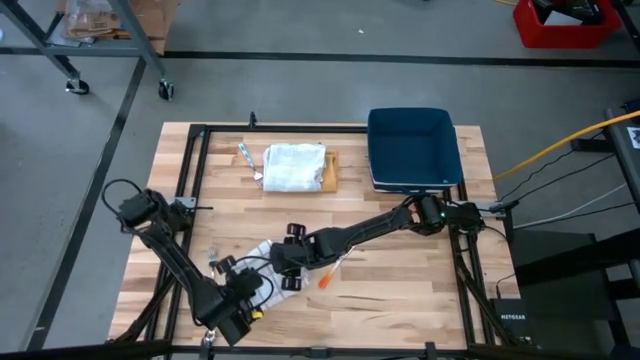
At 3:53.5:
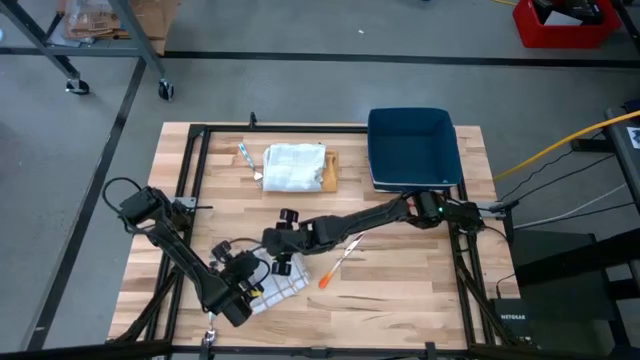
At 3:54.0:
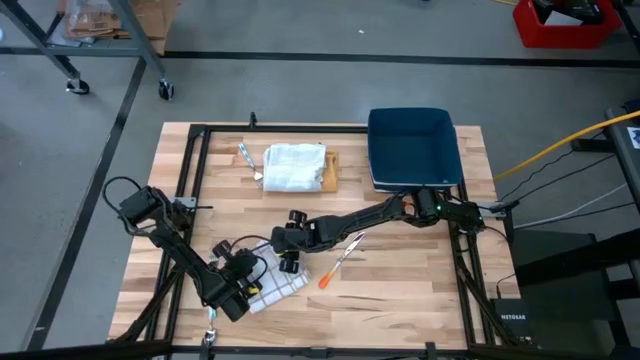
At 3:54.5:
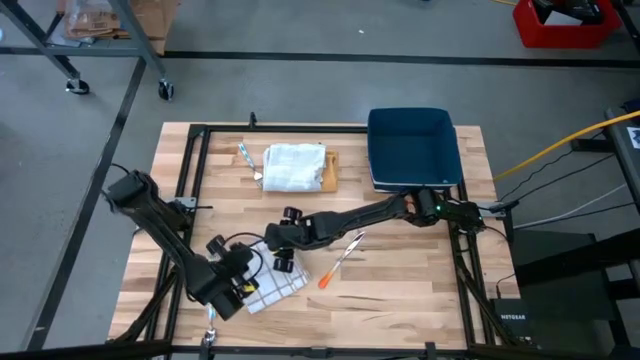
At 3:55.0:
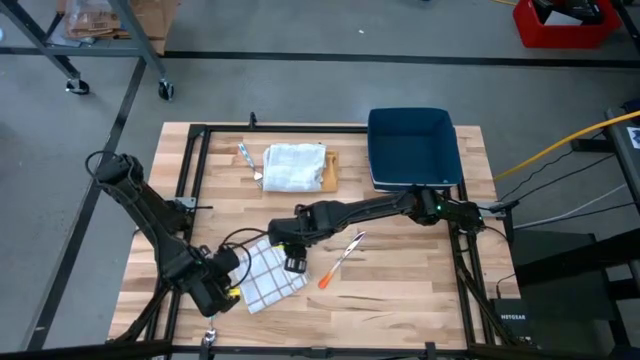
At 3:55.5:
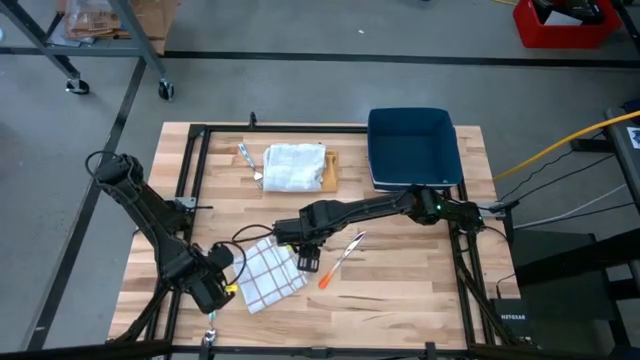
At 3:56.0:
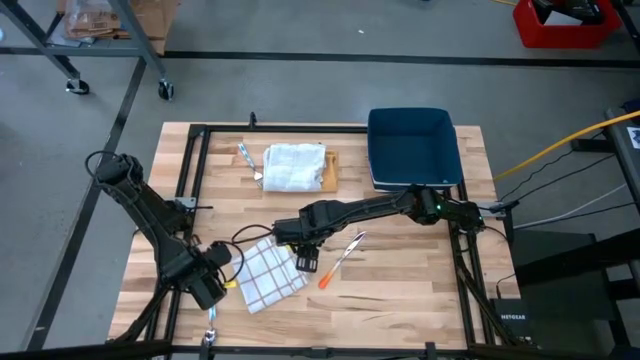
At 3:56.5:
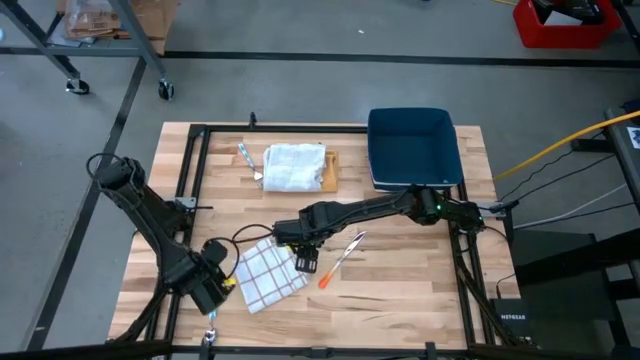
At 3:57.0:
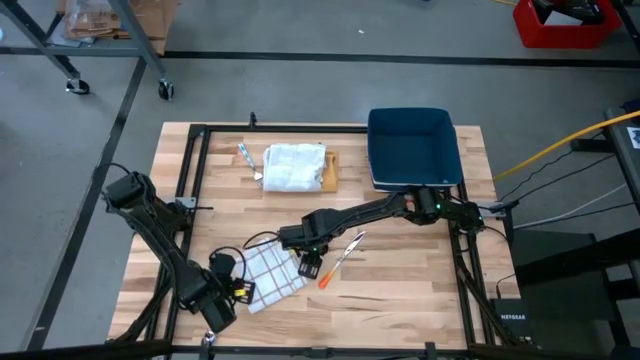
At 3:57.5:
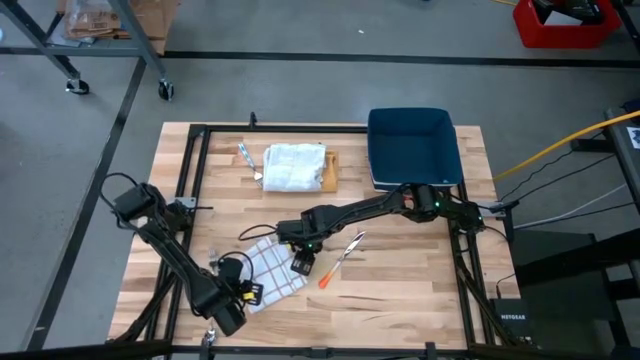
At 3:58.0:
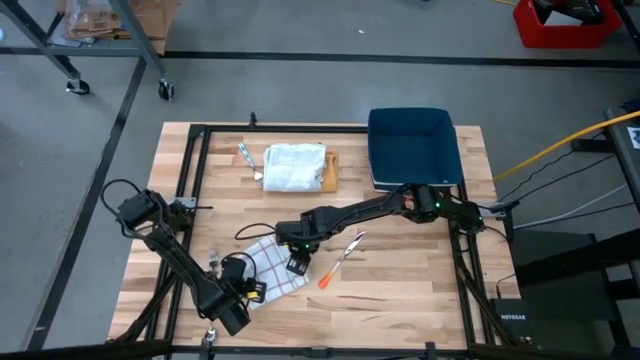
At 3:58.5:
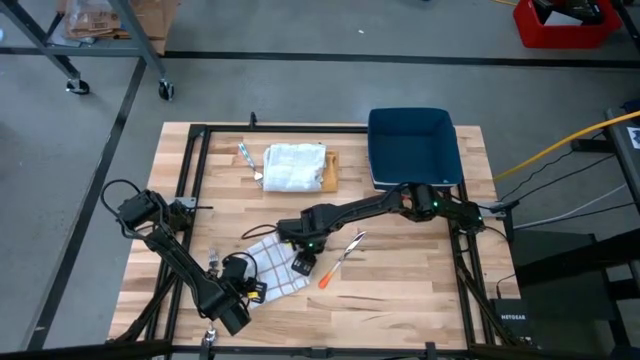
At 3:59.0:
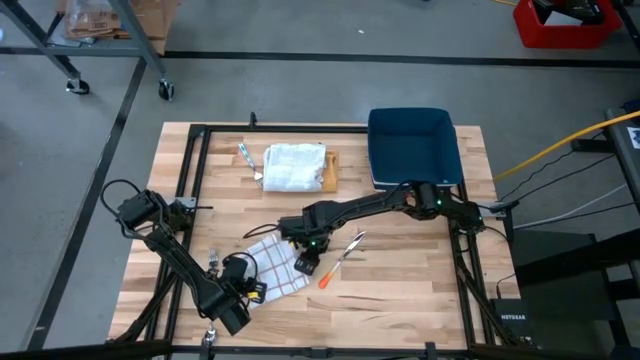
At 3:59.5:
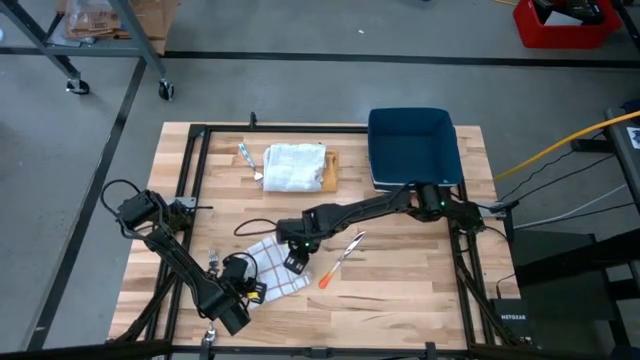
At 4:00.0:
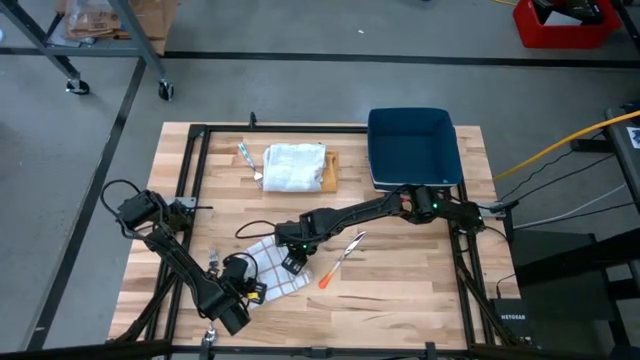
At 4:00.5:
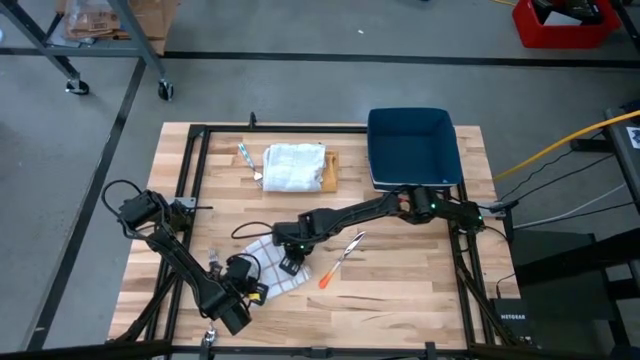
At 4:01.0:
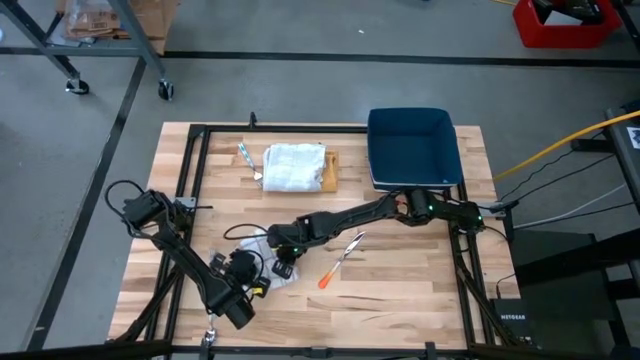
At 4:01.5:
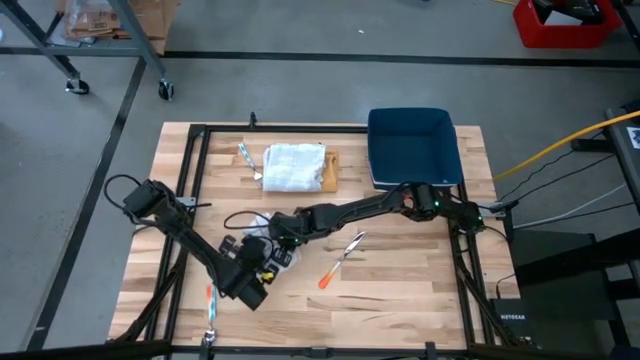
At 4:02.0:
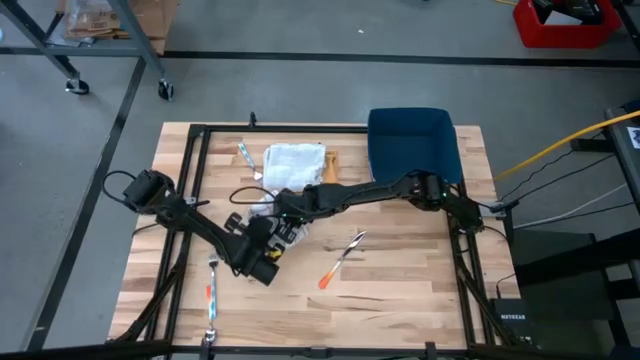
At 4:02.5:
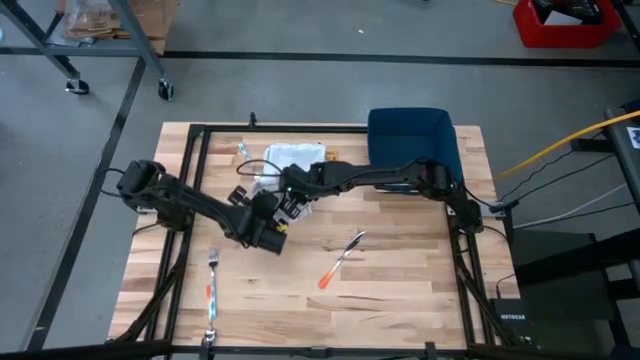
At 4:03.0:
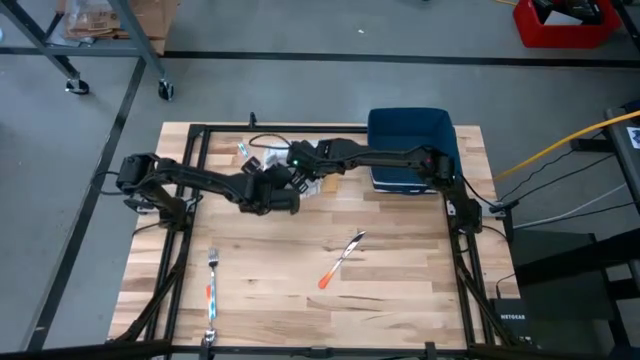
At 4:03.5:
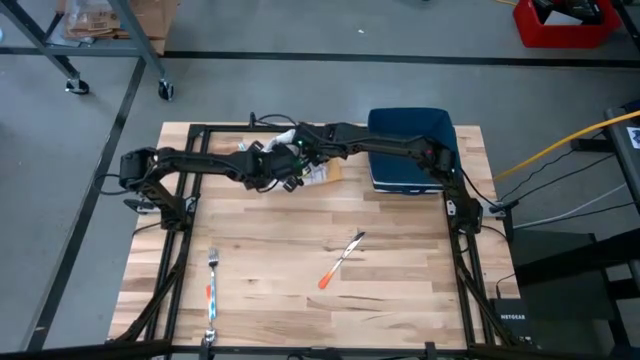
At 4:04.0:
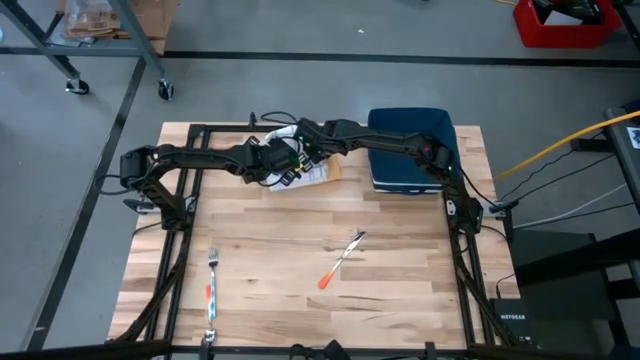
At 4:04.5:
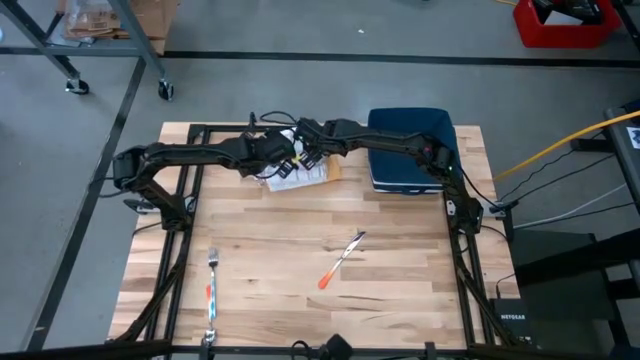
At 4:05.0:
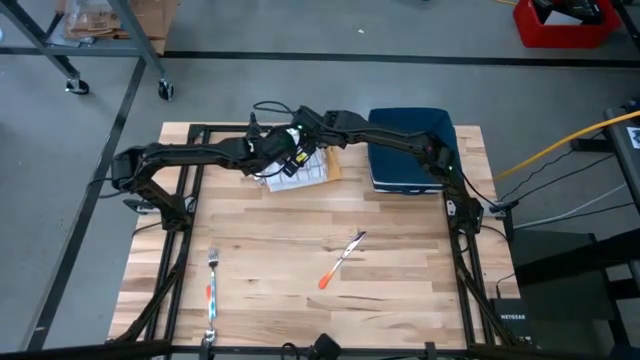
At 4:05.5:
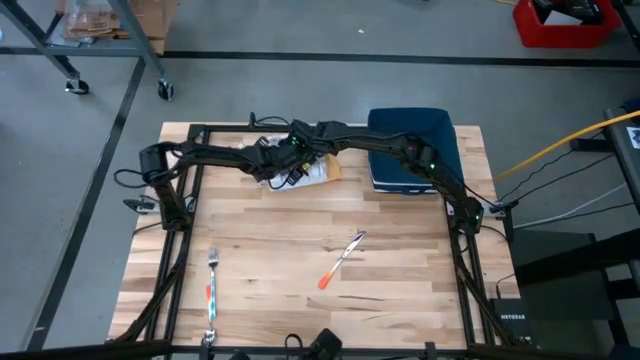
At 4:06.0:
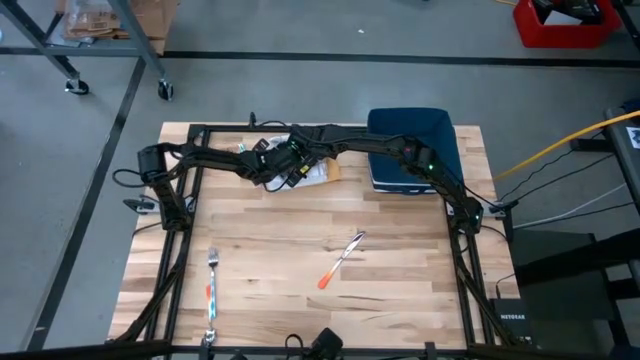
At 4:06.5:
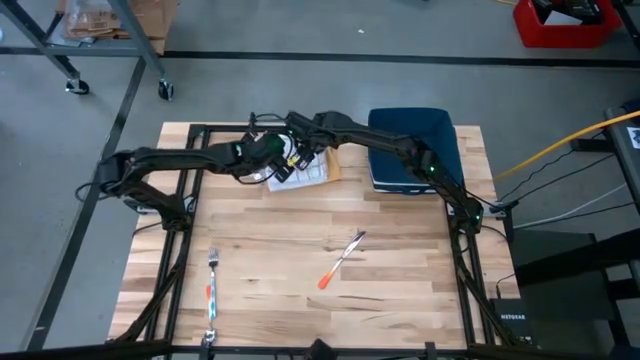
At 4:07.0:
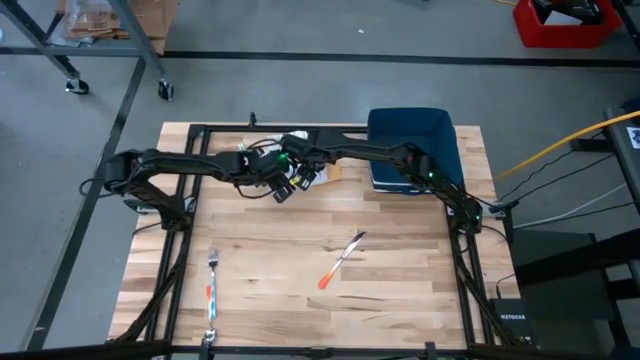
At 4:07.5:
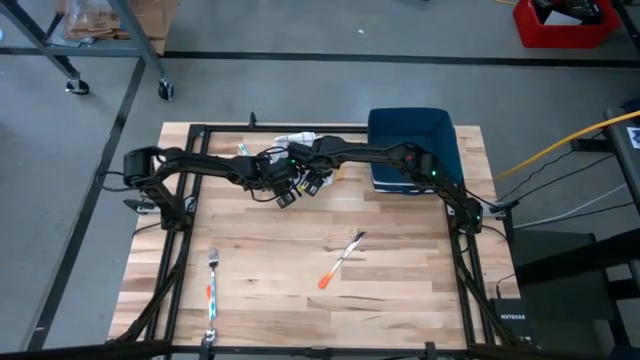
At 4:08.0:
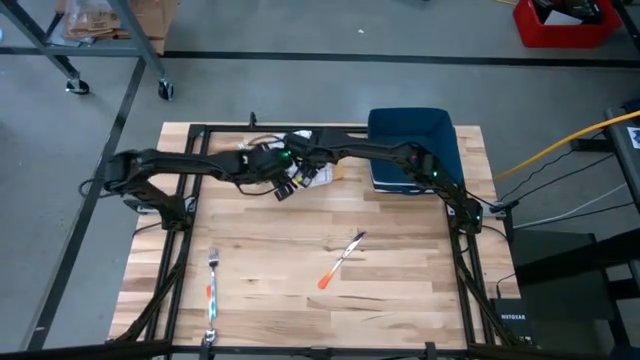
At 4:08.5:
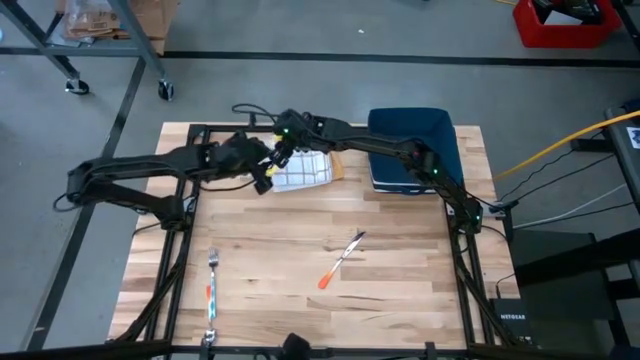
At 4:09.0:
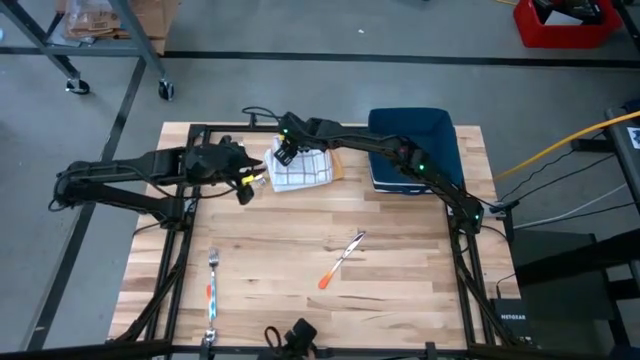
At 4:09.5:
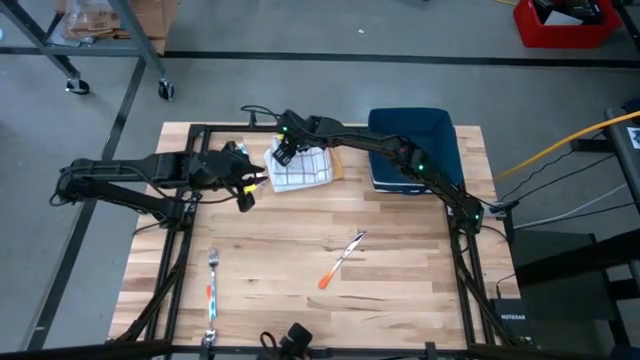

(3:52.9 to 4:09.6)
Task: Fold towel
Stack the folded white patterned towel on top of the white patterned towel

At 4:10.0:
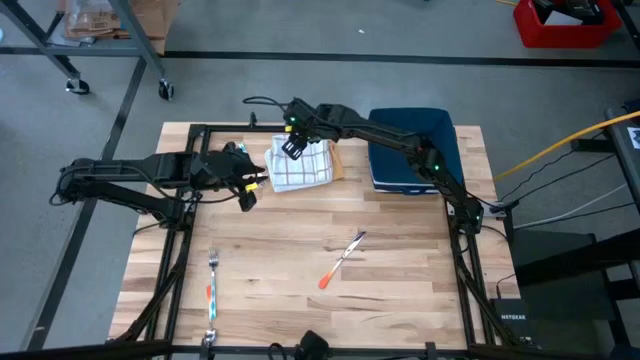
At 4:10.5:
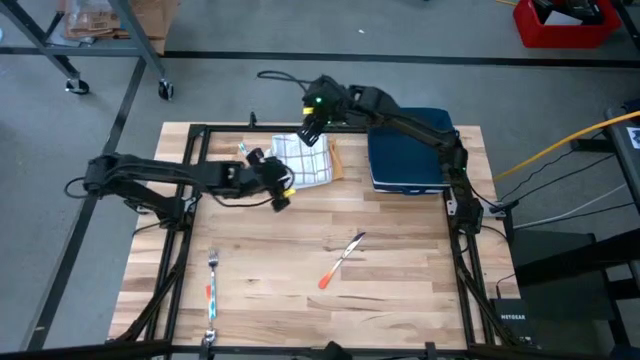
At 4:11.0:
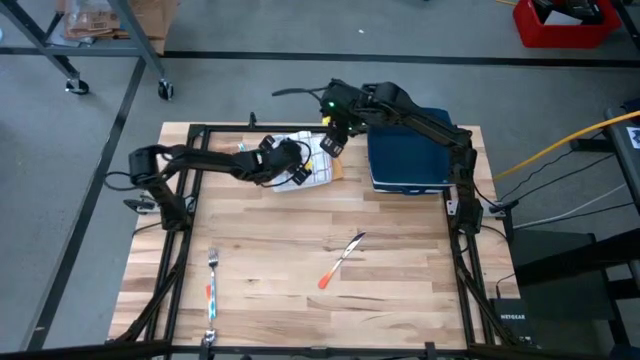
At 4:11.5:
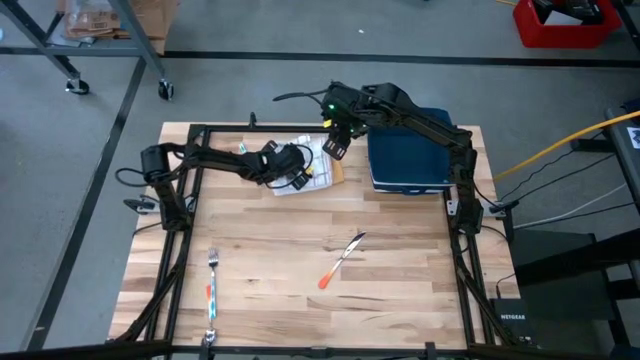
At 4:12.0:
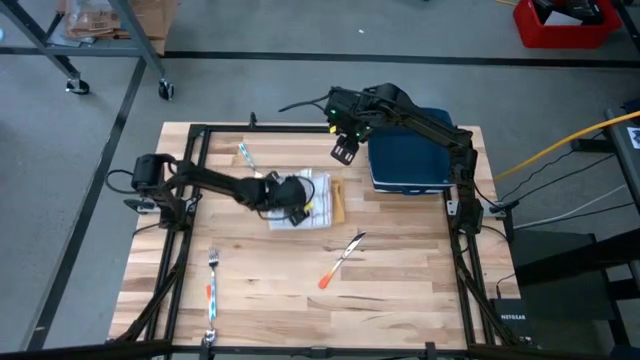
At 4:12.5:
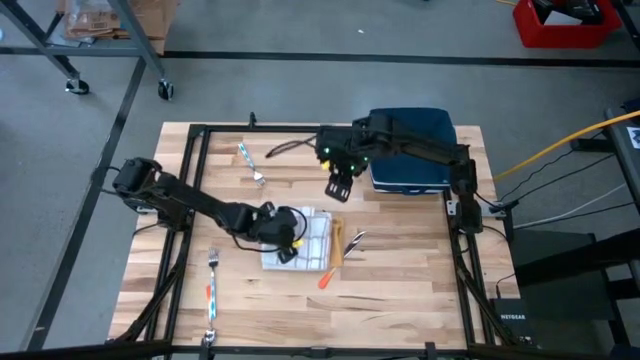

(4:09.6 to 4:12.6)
Move the stacked folded towels to the center of the table
